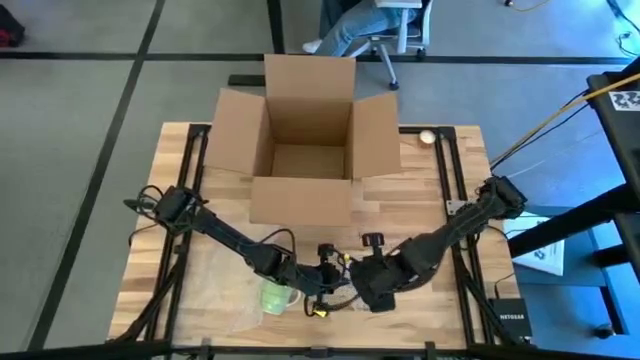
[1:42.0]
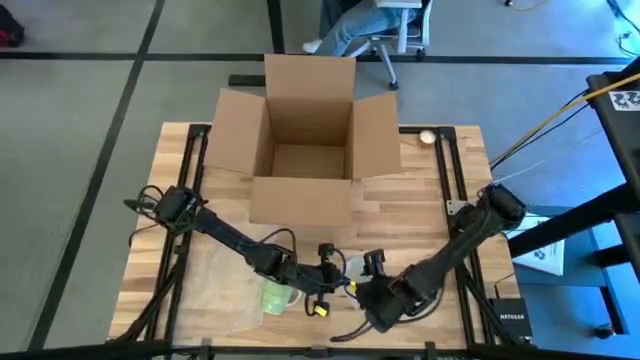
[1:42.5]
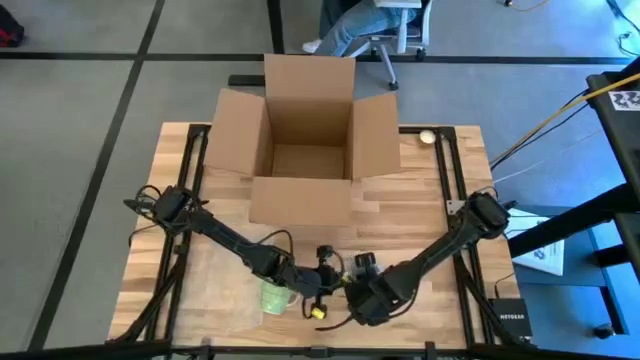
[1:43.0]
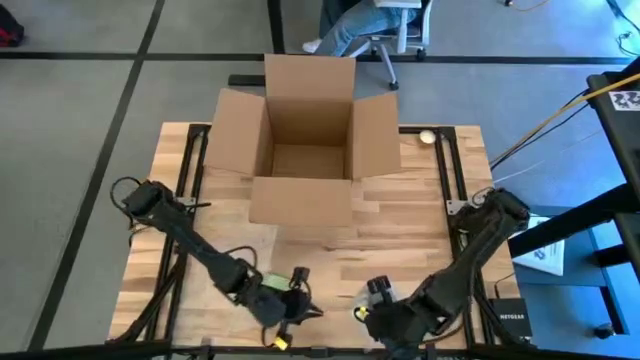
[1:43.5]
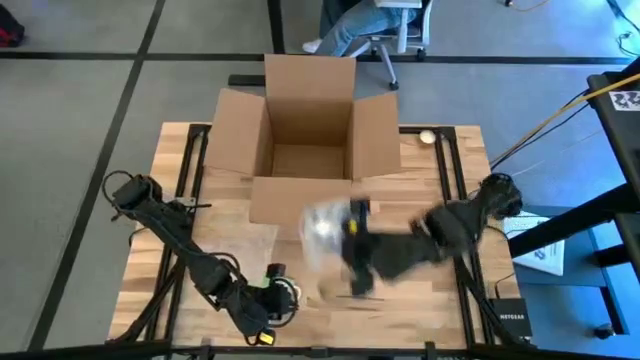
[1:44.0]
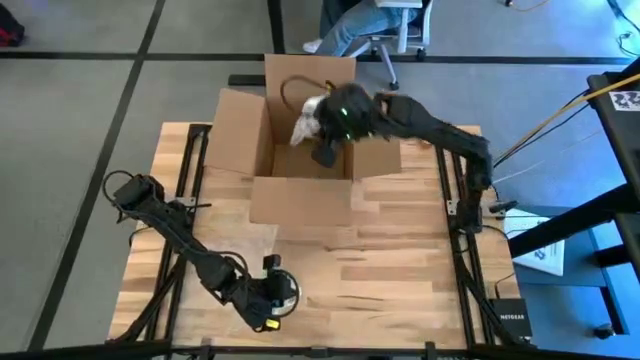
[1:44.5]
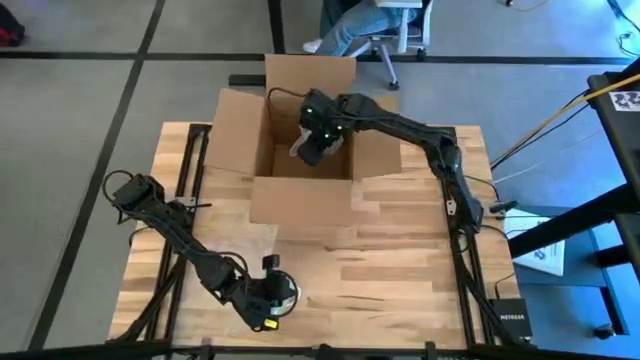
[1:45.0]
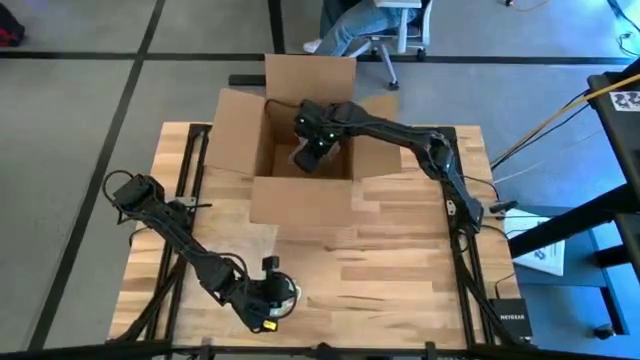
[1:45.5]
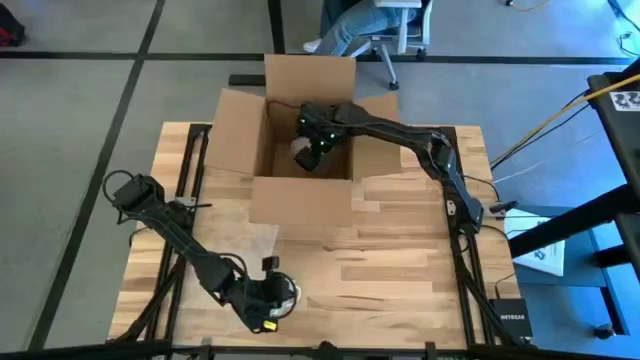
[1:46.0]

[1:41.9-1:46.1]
Task: wrap mug
Put the wrapped blue mug into the brown cardboard box

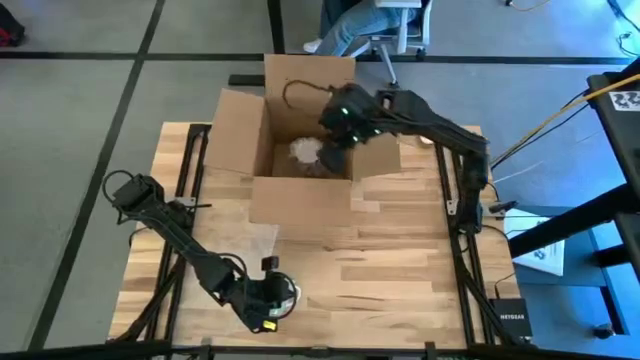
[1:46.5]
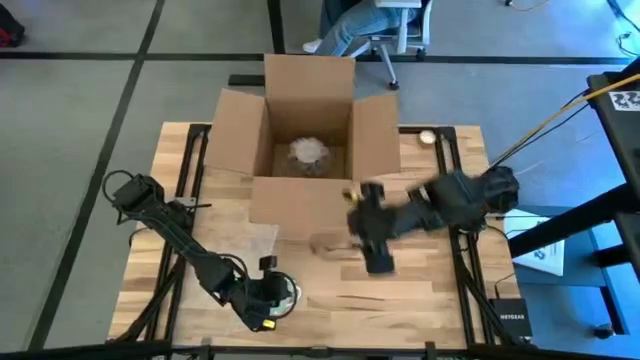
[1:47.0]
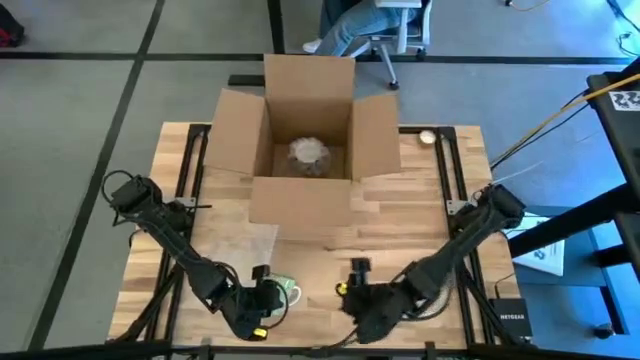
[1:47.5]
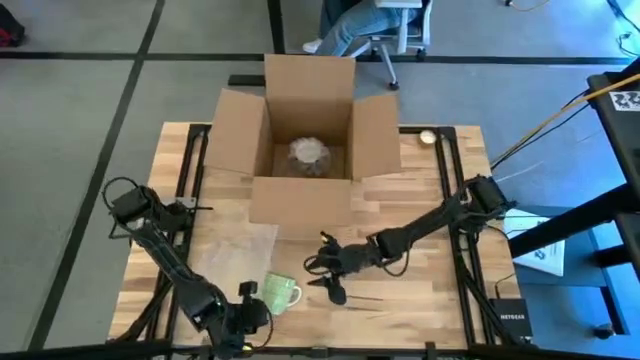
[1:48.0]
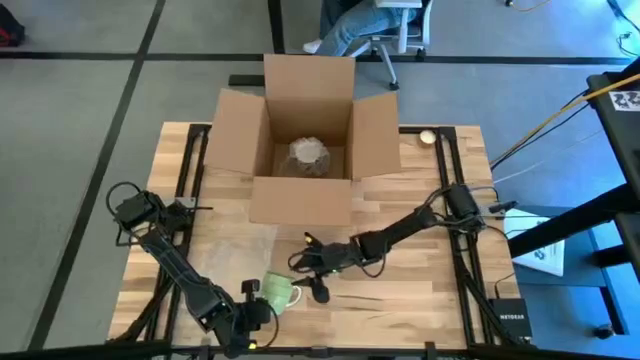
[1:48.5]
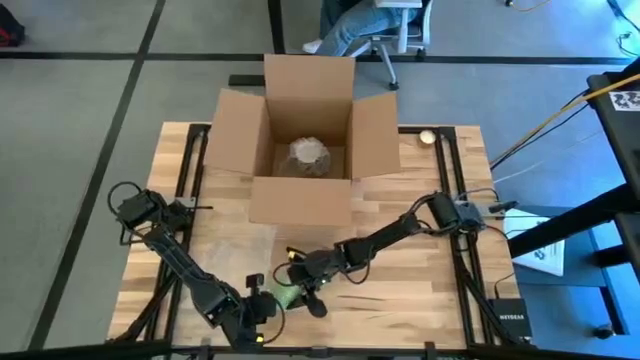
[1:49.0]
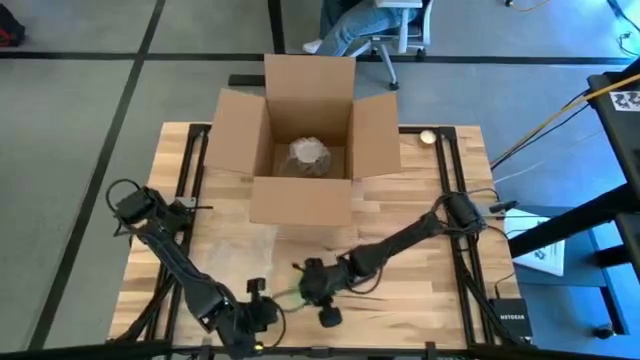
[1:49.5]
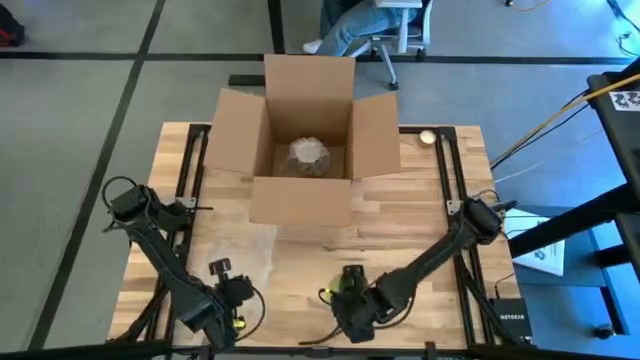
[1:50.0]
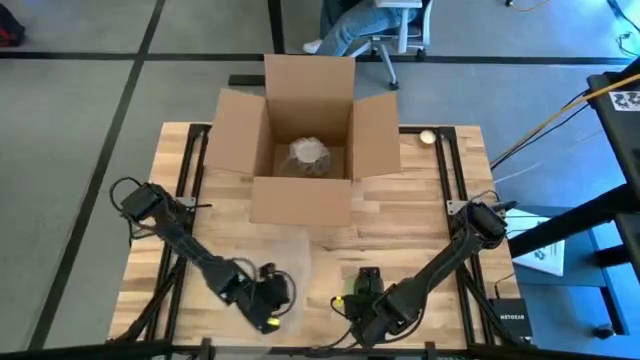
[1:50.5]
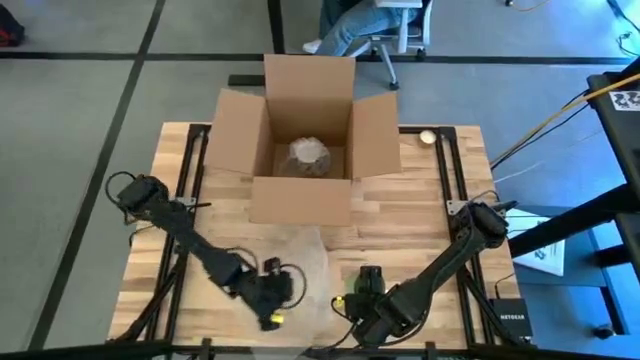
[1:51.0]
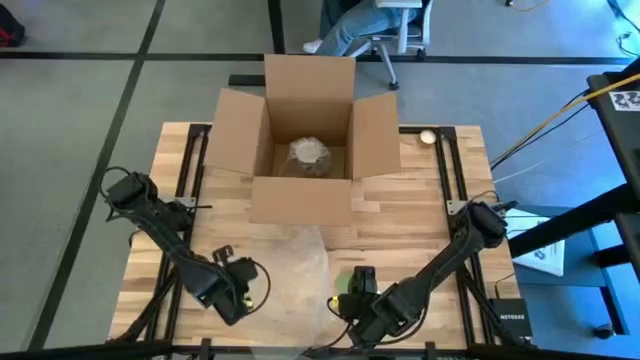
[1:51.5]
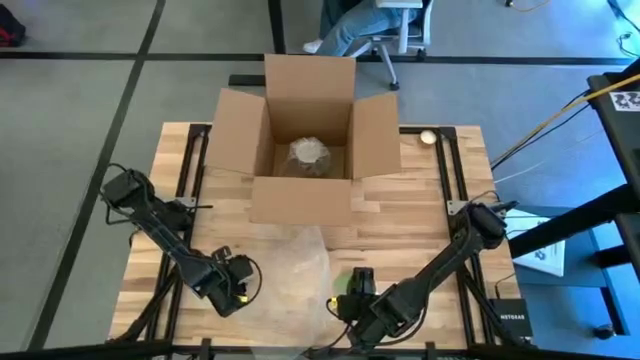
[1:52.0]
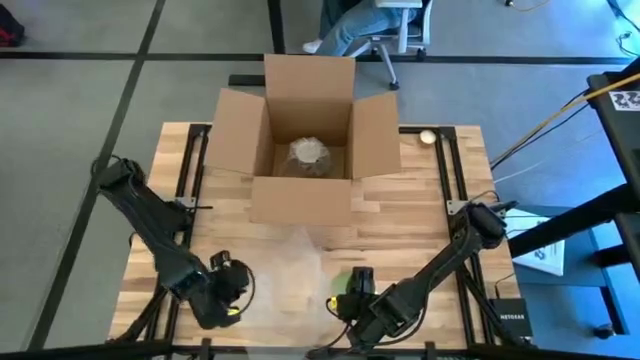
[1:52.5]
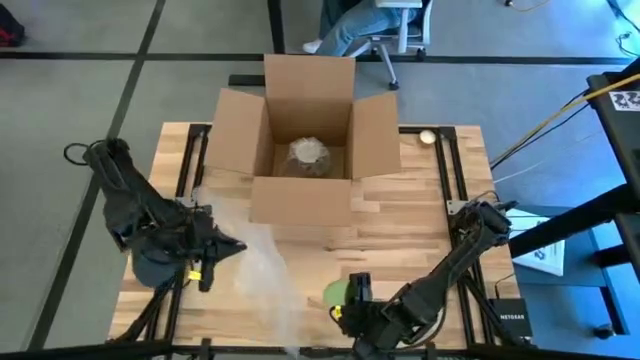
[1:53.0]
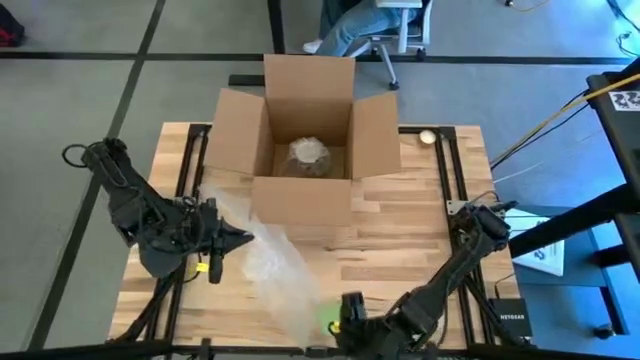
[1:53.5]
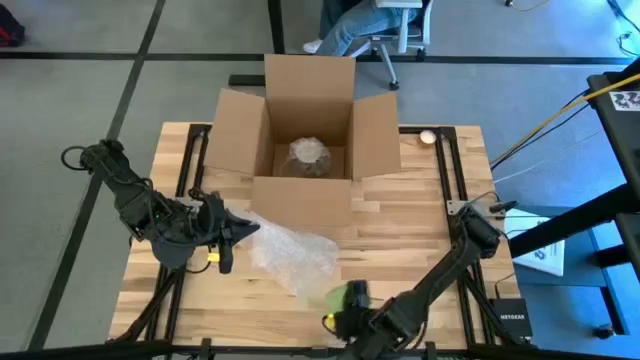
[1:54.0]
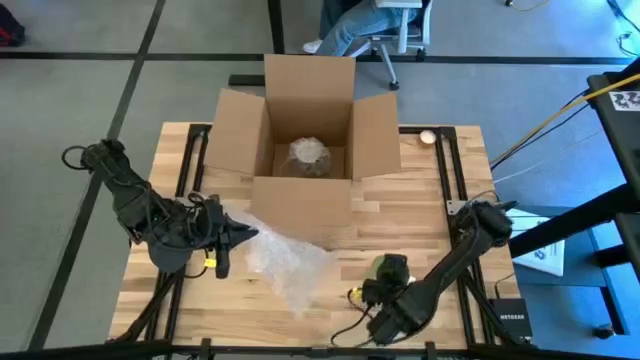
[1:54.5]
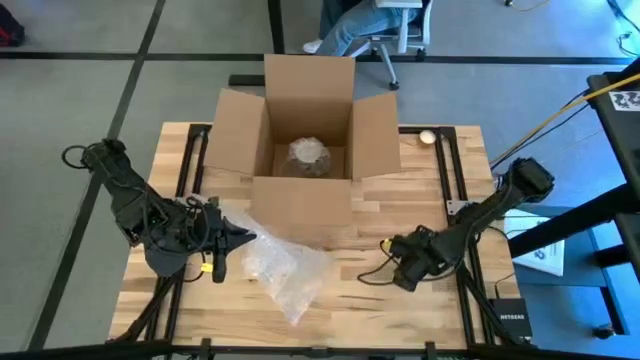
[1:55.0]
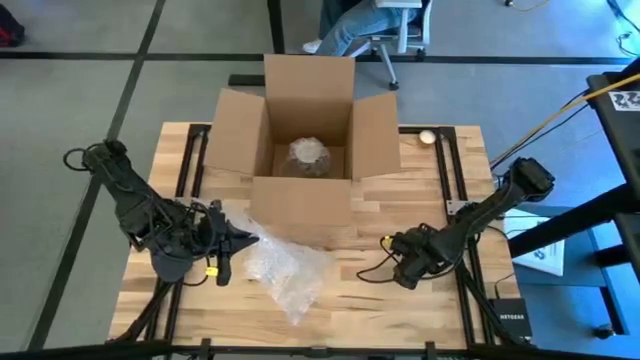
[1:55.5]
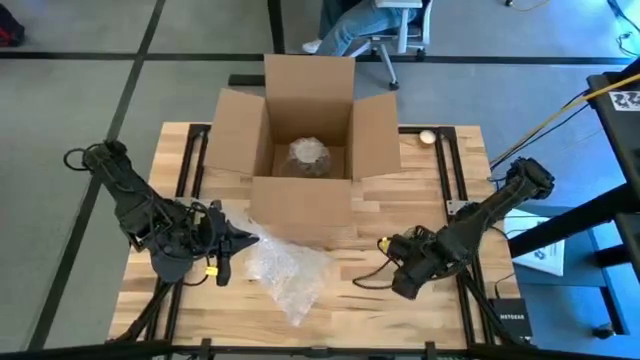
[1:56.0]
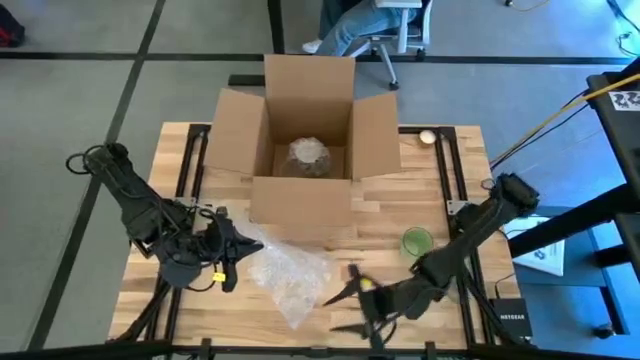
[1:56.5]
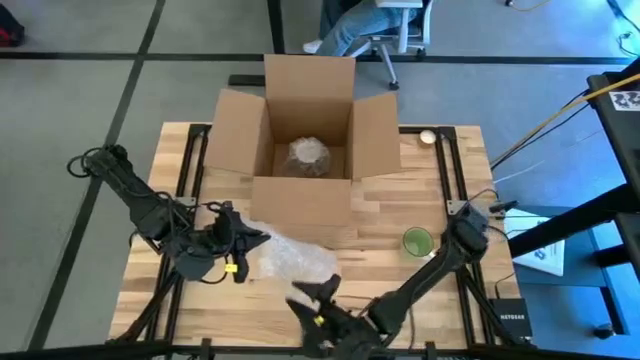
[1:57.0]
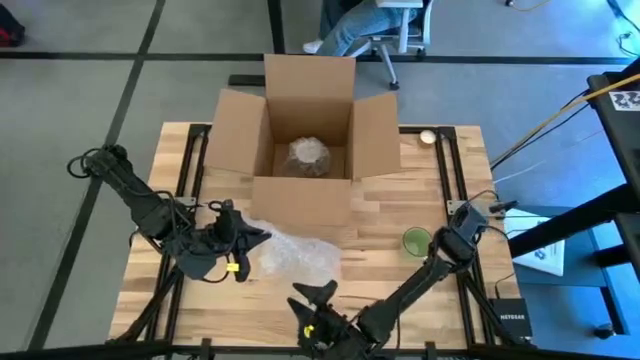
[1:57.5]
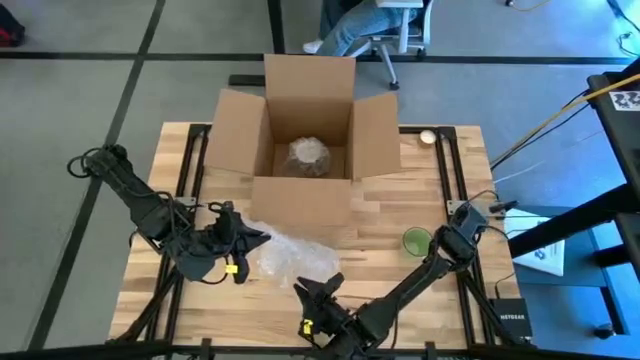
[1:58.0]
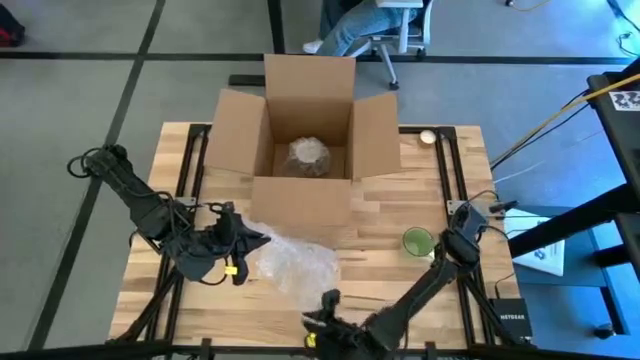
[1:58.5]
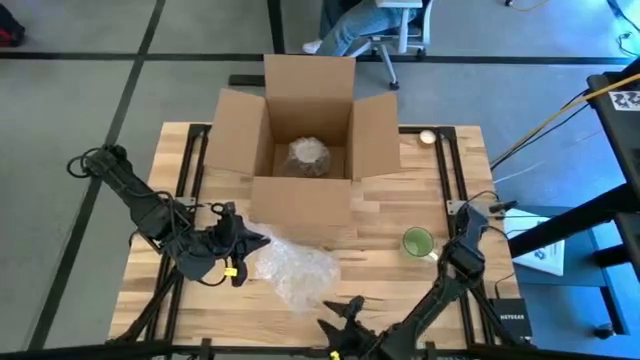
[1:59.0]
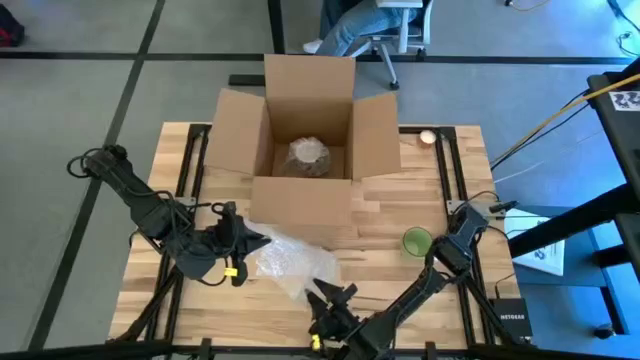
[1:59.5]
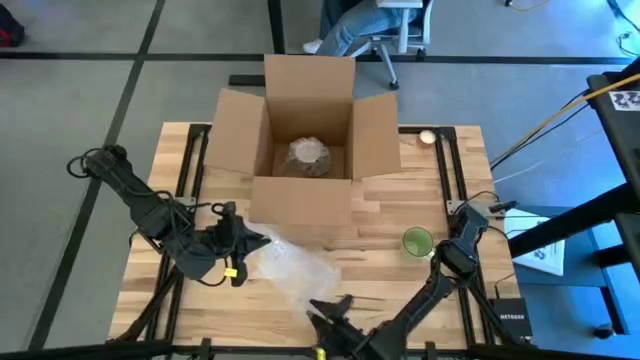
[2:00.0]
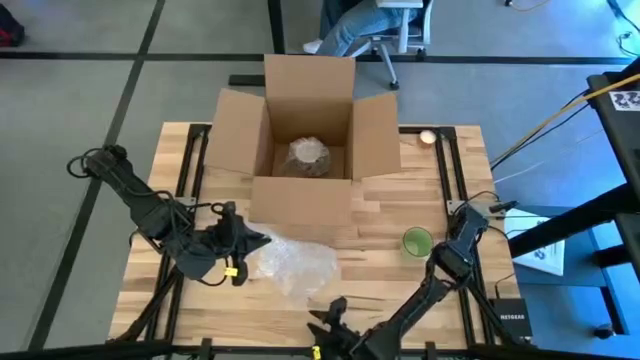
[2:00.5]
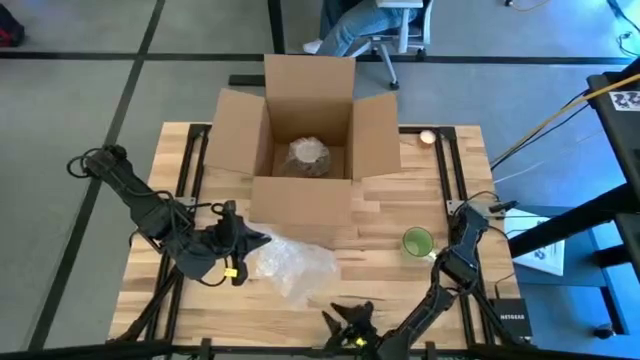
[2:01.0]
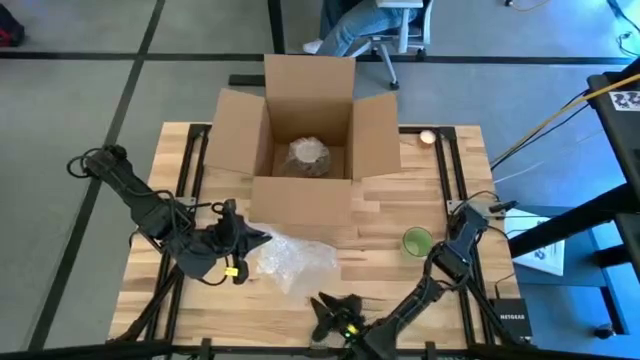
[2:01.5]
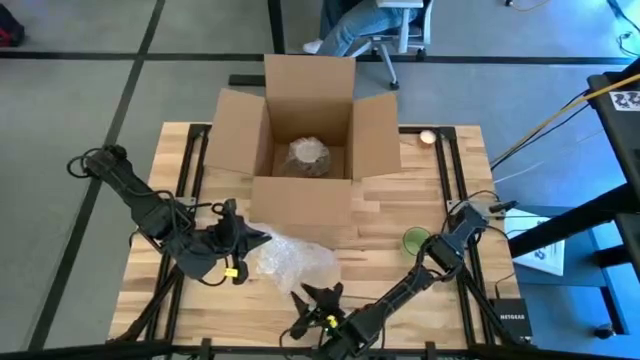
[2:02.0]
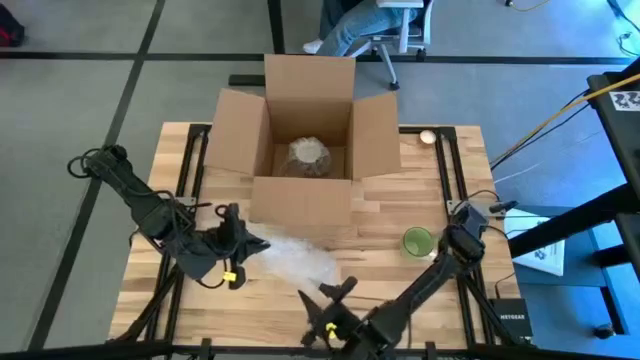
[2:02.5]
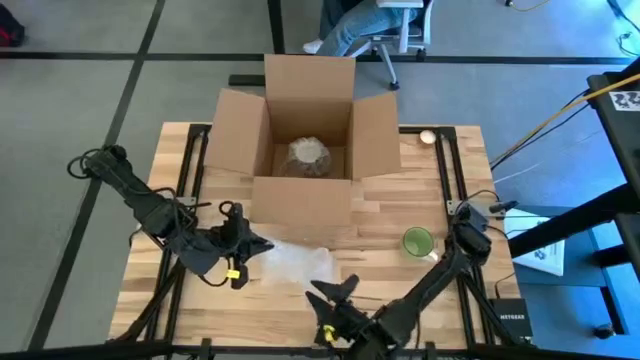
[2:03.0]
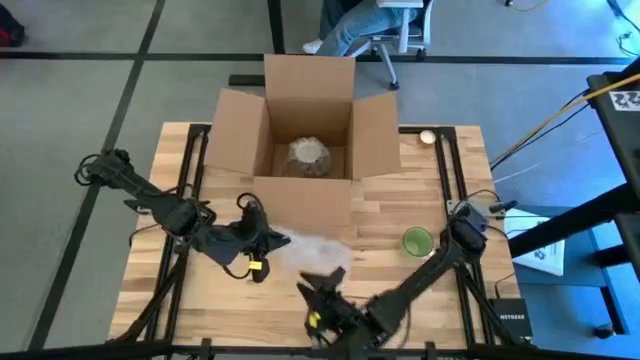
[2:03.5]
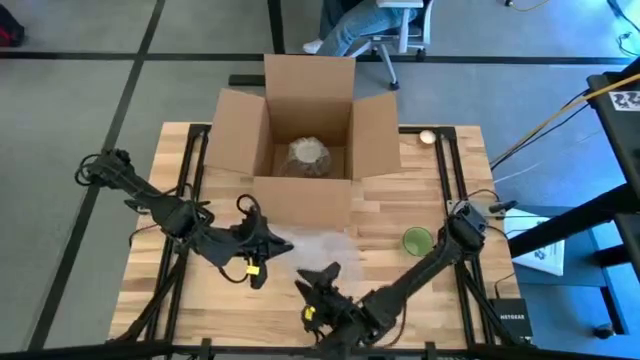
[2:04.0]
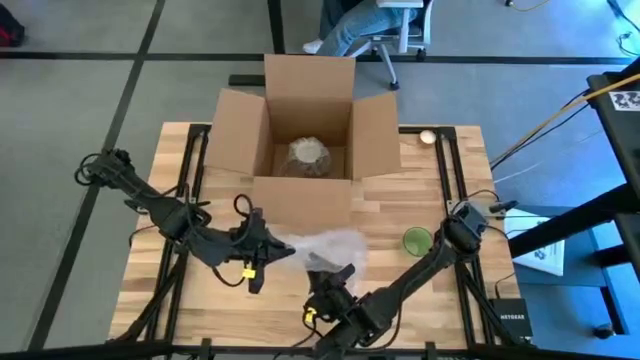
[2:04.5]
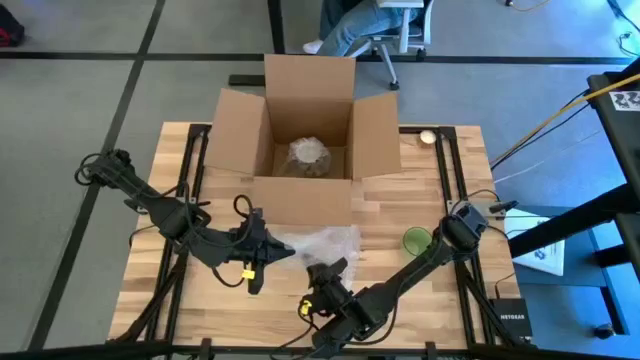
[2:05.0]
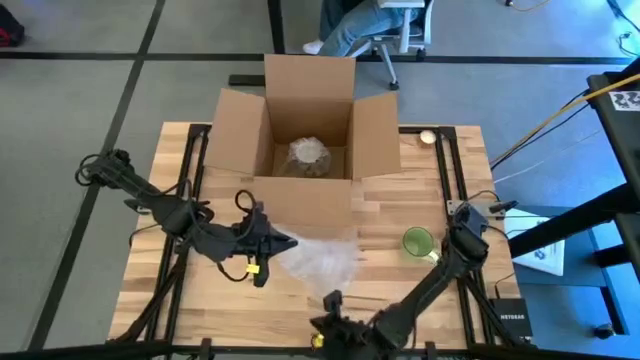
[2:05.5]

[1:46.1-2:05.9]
Wrap the green mug with the transparent bubble wrap
